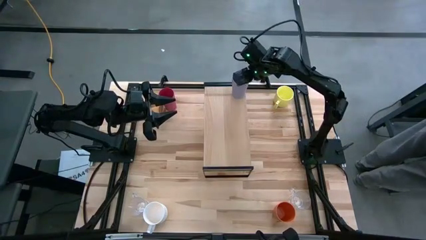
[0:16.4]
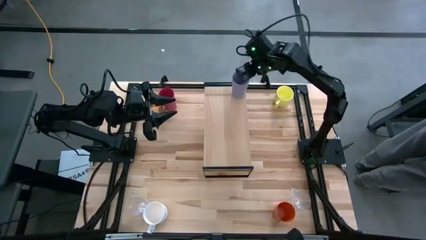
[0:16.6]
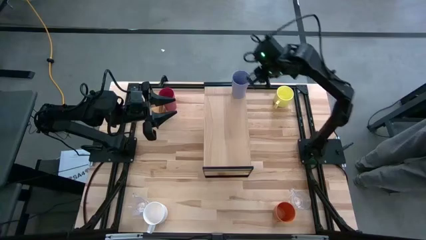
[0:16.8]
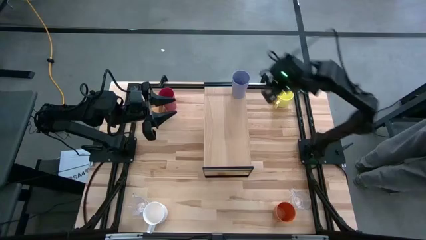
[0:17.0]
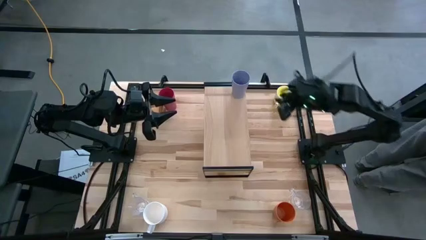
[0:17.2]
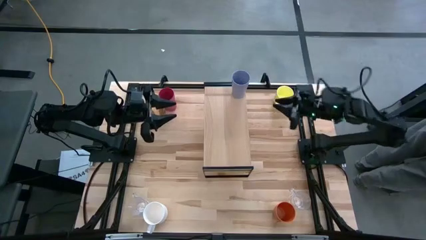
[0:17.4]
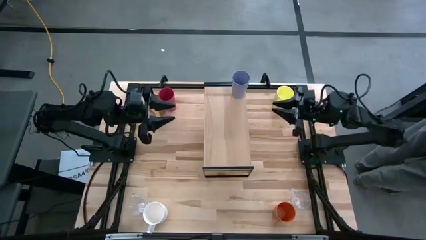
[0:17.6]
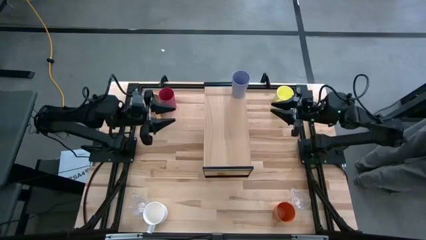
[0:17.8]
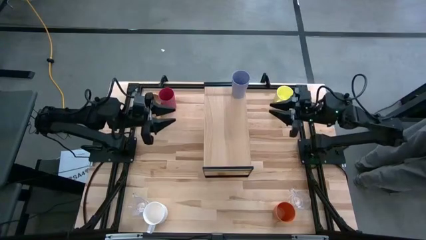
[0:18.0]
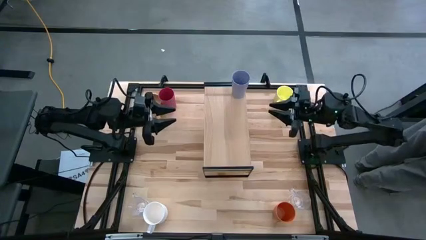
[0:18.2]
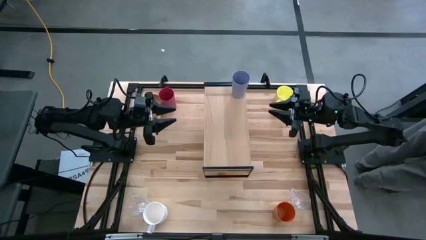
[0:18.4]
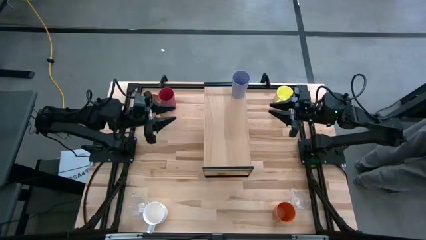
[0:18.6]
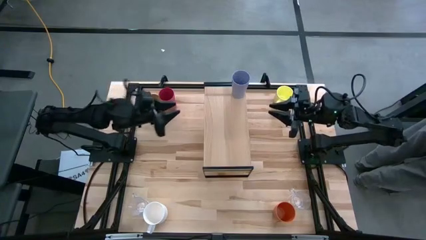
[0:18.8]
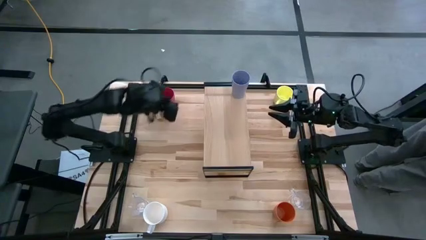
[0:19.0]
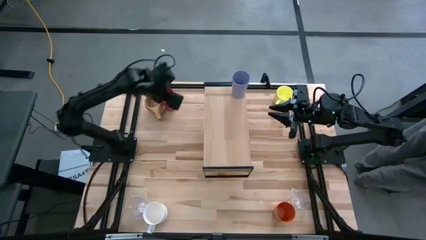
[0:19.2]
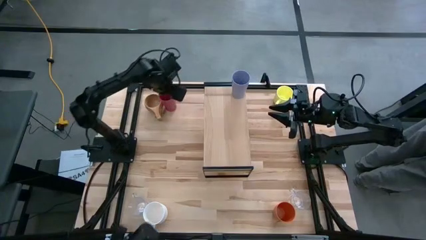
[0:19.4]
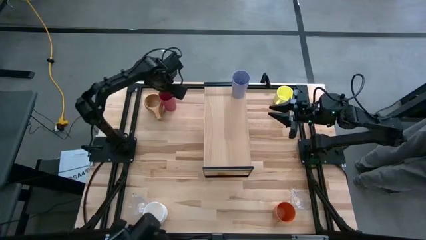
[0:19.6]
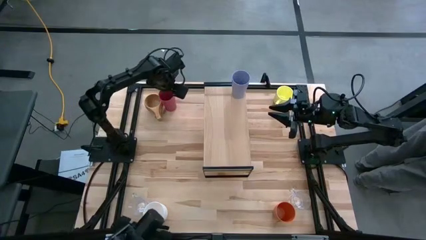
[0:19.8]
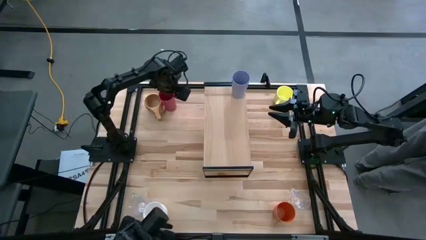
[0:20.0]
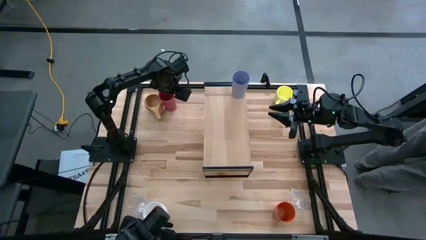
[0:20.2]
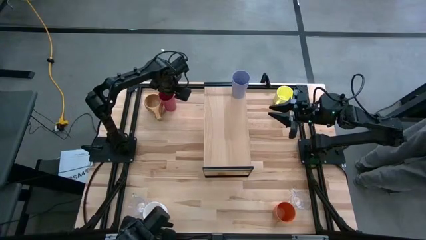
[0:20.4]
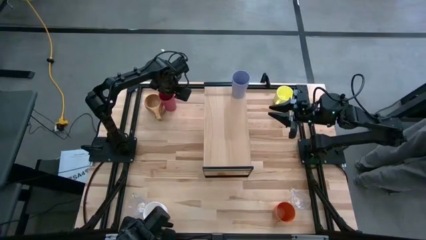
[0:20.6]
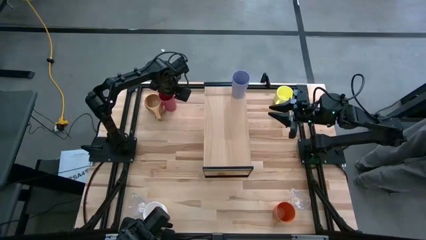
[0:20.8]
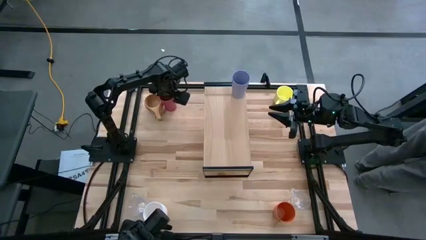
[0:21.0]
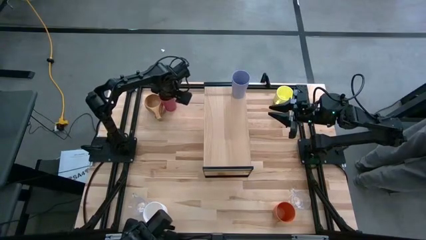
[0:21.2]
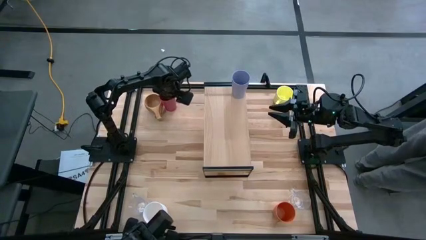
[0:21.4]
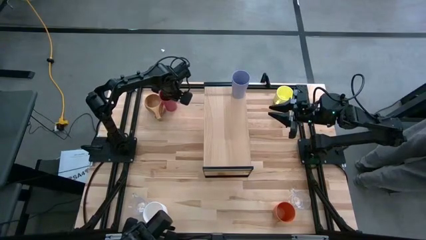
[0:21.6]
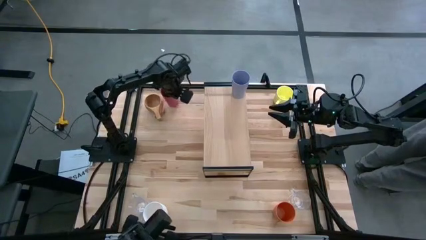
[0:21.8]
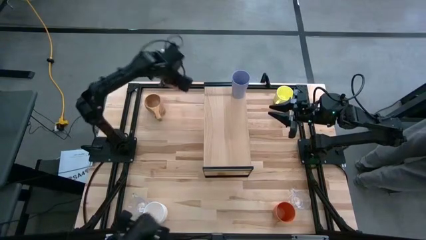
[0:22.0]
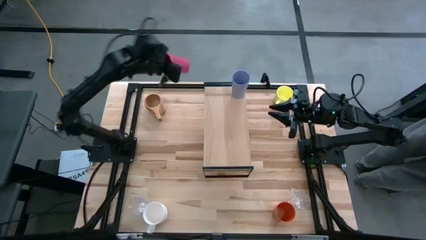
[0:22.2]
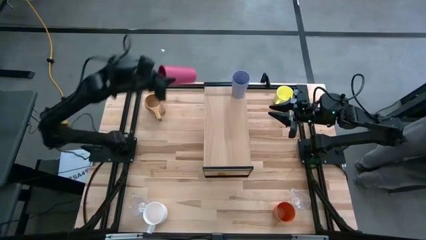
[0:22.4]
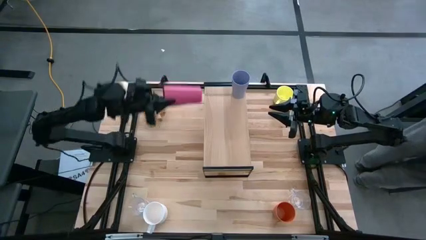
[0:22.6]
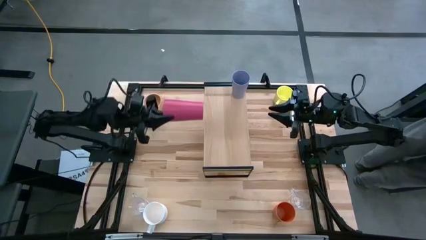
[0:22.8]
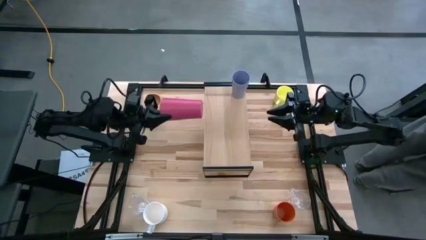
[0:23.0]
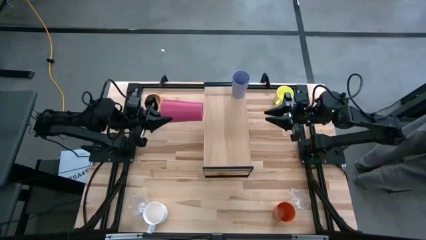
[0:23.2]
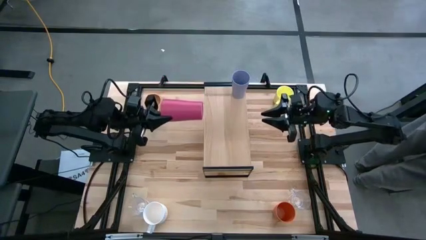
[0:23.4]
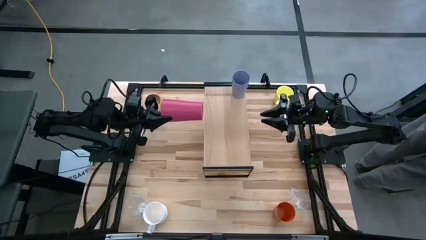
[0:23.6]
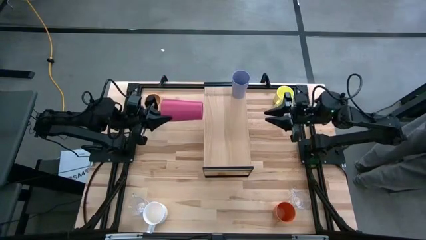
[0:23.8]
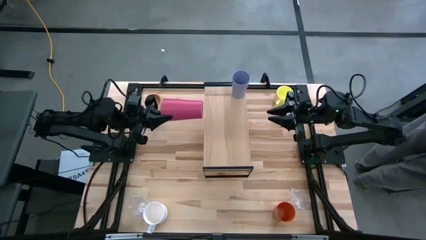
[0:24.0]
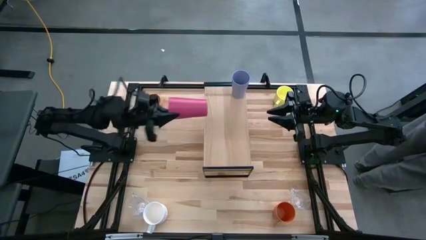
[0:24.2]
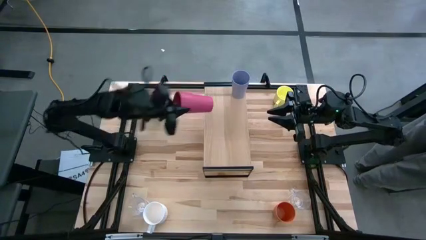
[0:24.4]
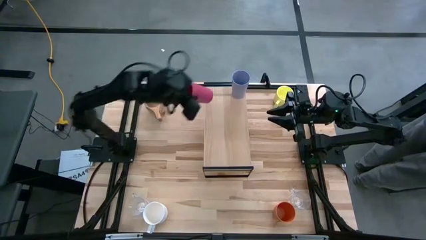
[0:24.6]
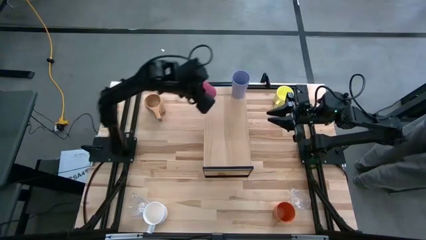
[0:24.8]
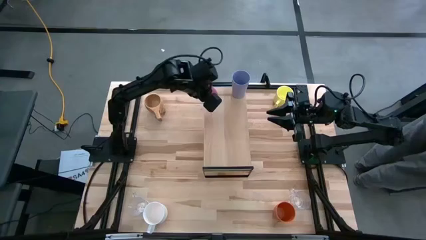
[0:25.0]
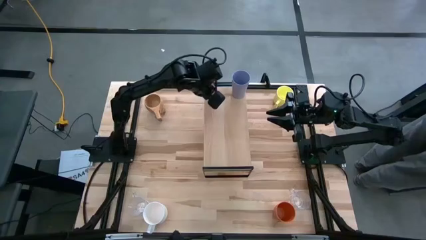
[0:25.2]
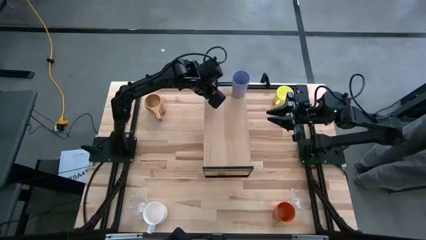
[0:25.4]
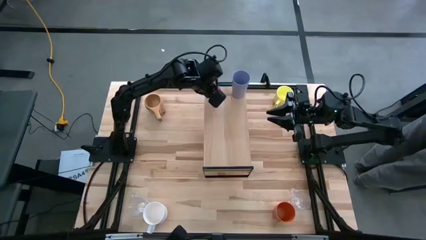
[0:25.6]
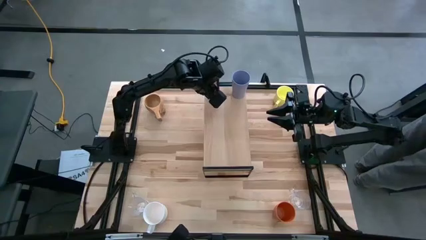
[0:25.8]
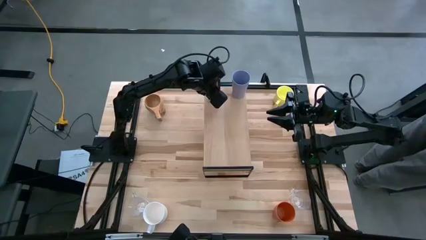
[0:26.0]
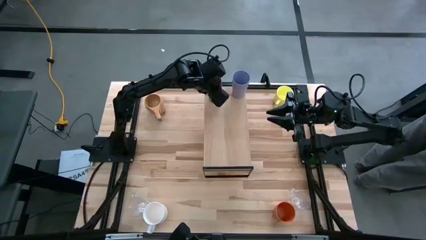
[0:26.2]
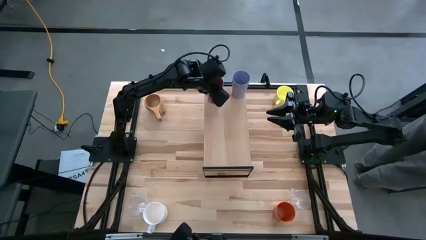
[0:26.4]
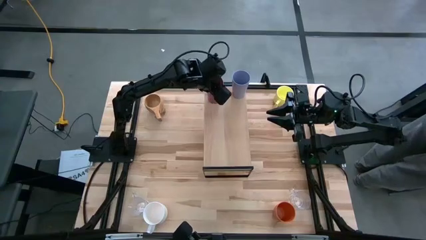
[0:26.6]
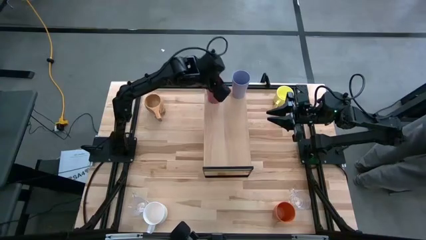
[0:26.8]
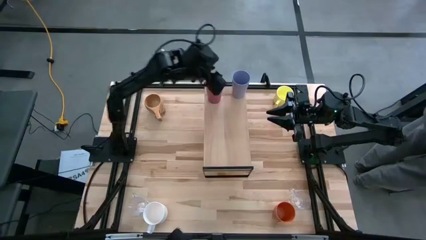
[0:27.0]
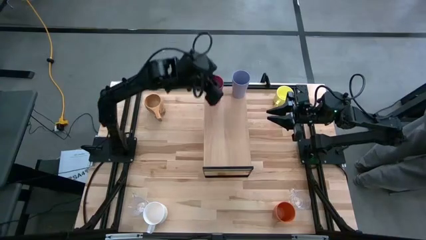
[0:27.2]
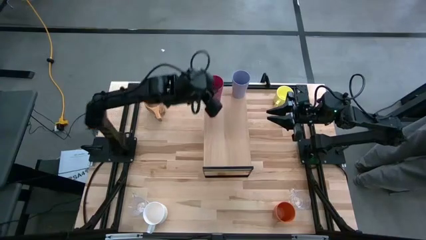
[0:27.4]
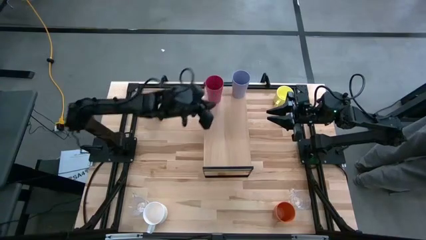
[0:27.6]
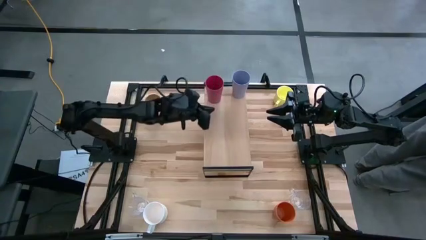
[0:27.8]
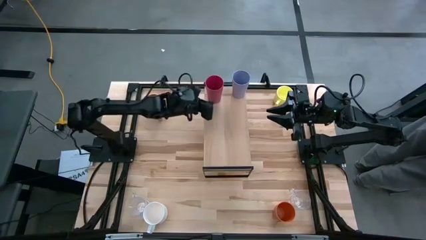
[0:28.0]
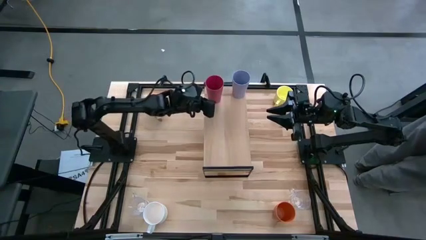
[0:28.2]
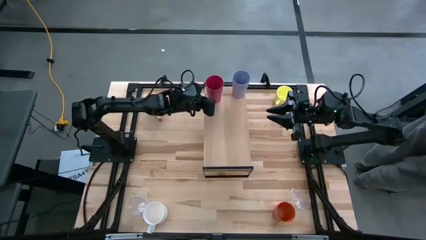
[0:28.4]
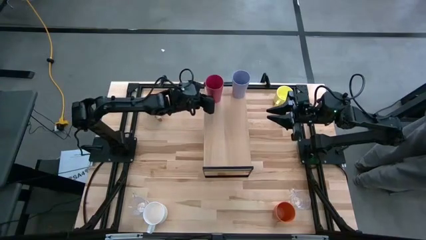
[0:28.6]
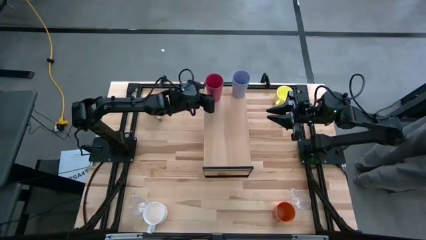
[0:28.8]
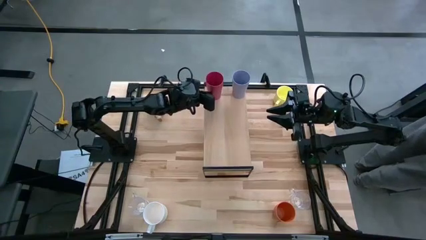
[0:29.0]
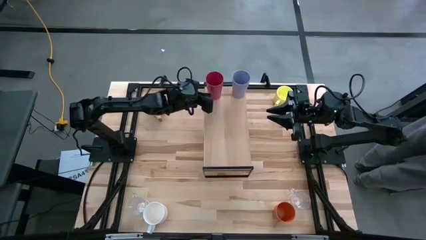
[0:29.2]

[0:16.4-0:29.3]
Task: Stack small to large cups/mugs on shelf
Put the pink cup on the shelf
